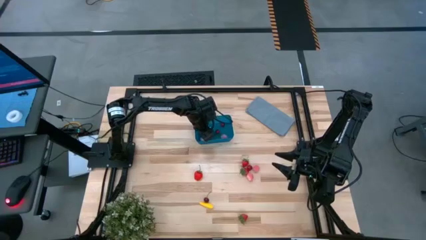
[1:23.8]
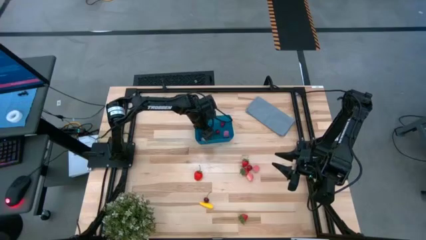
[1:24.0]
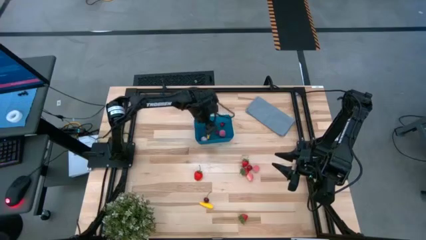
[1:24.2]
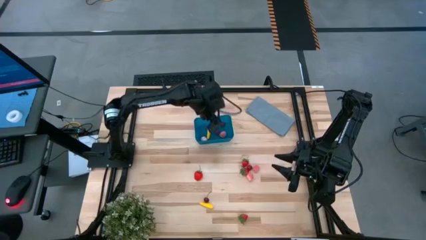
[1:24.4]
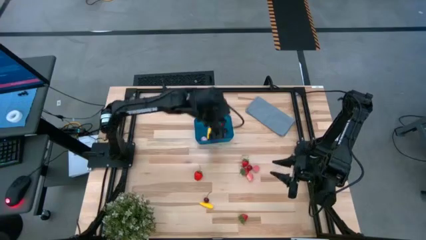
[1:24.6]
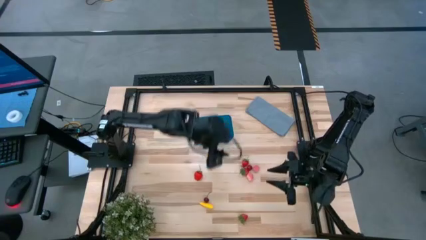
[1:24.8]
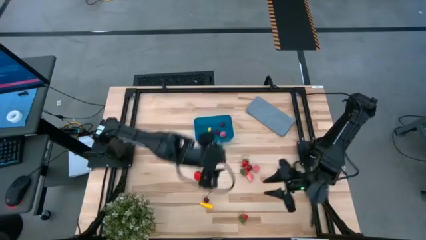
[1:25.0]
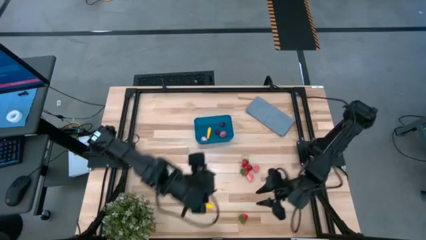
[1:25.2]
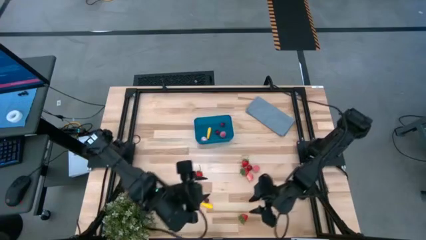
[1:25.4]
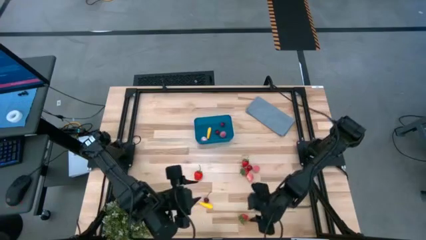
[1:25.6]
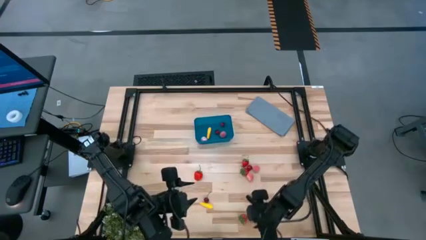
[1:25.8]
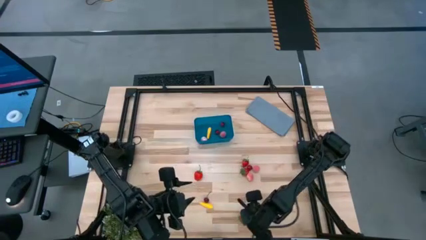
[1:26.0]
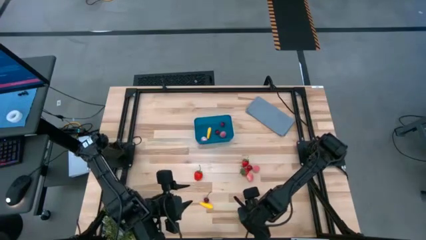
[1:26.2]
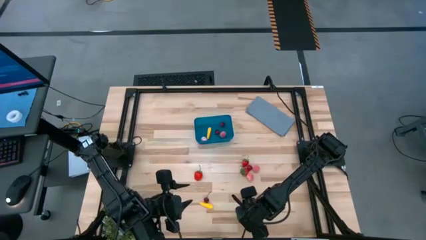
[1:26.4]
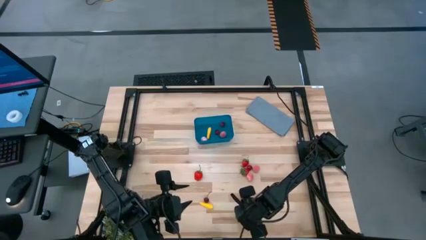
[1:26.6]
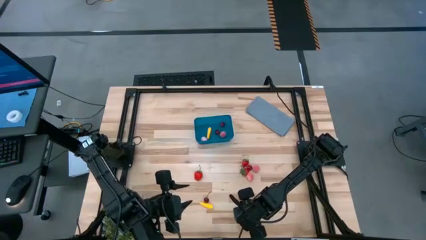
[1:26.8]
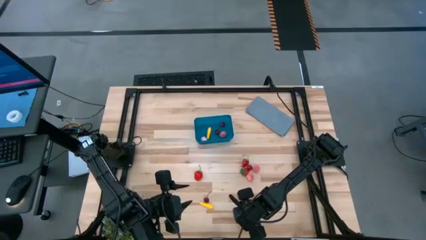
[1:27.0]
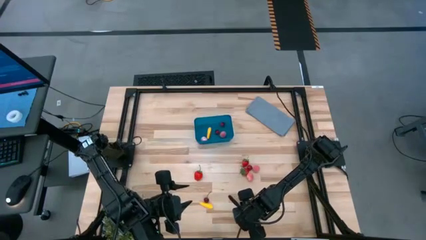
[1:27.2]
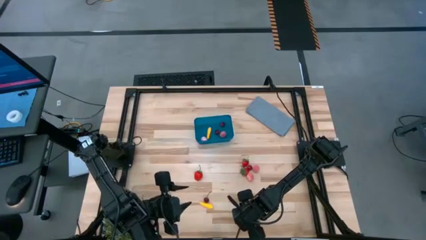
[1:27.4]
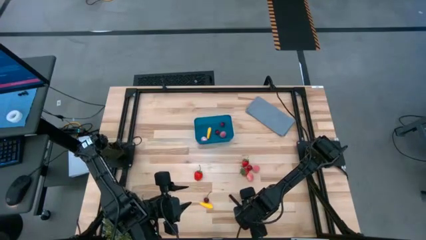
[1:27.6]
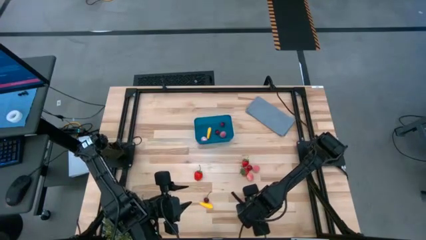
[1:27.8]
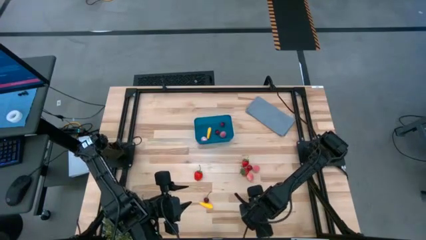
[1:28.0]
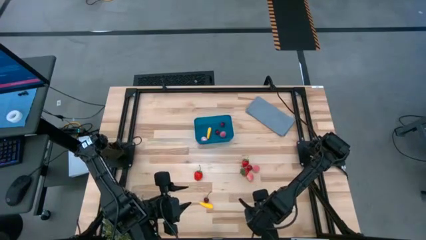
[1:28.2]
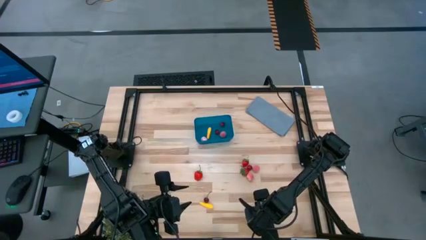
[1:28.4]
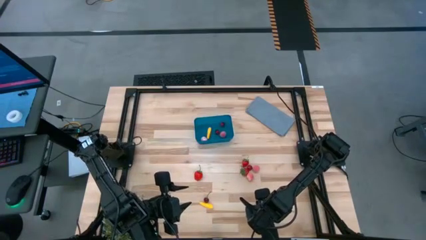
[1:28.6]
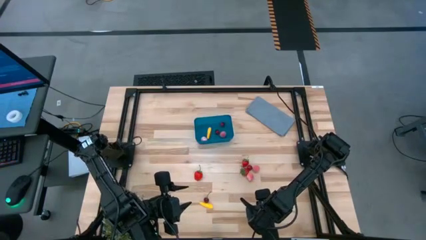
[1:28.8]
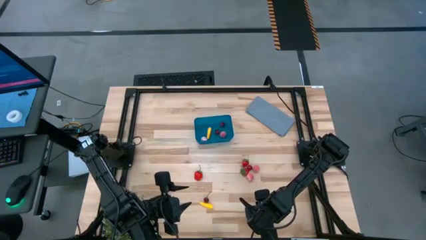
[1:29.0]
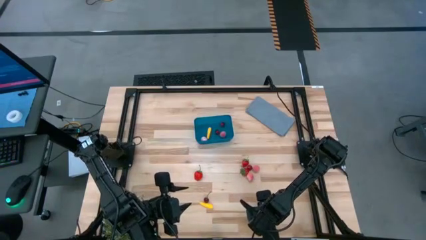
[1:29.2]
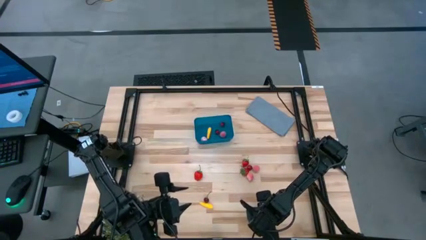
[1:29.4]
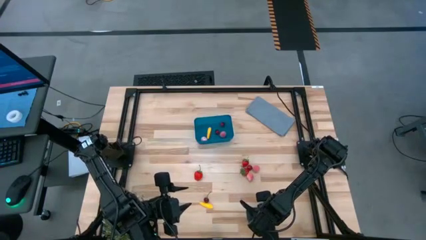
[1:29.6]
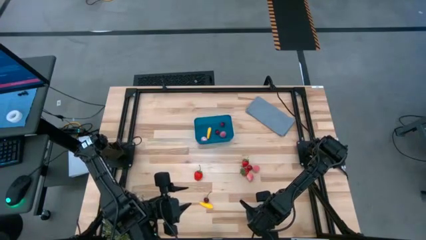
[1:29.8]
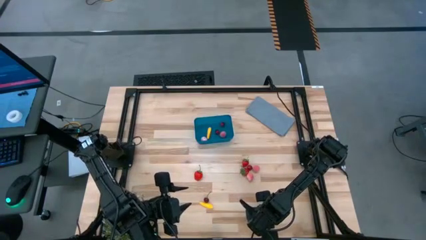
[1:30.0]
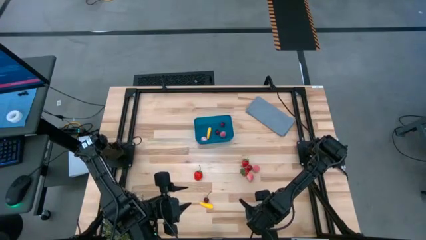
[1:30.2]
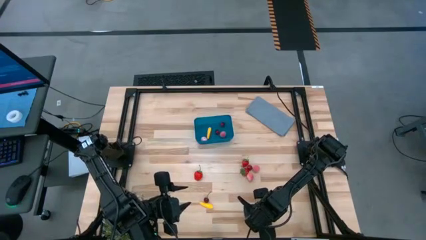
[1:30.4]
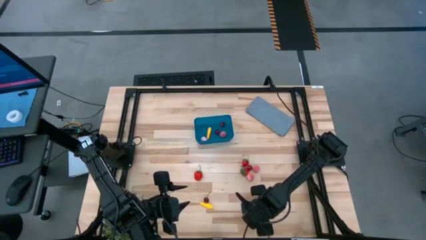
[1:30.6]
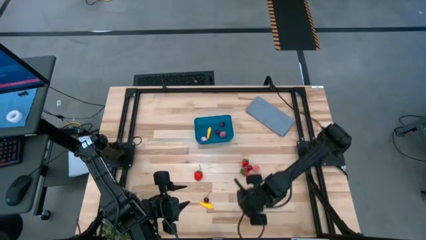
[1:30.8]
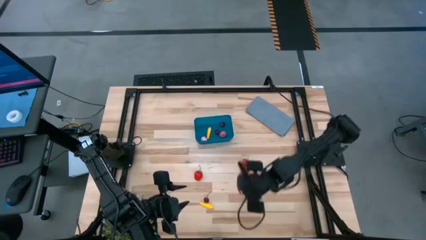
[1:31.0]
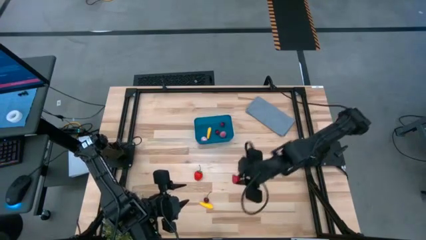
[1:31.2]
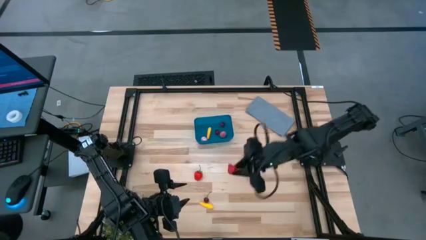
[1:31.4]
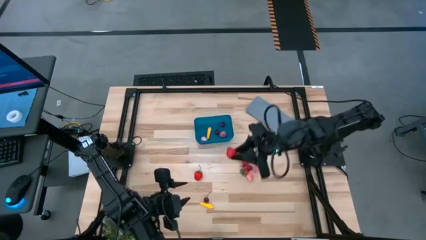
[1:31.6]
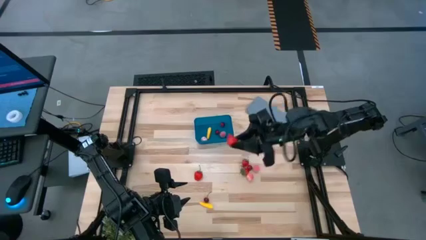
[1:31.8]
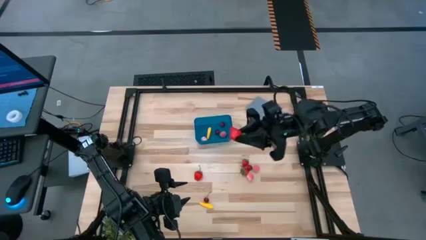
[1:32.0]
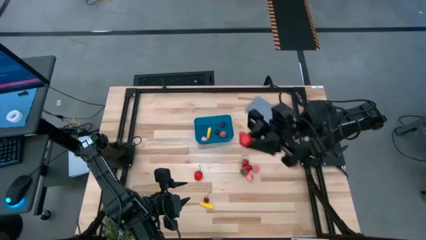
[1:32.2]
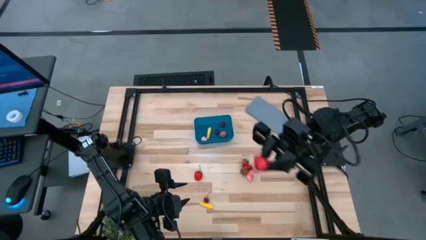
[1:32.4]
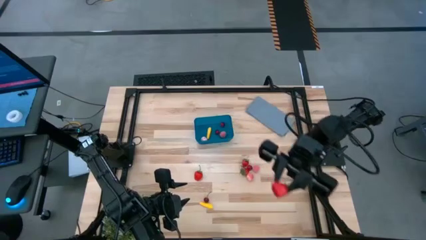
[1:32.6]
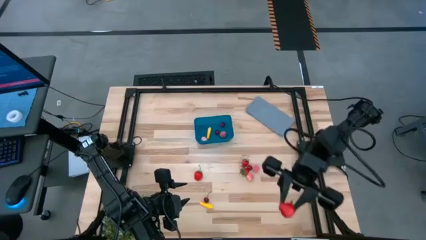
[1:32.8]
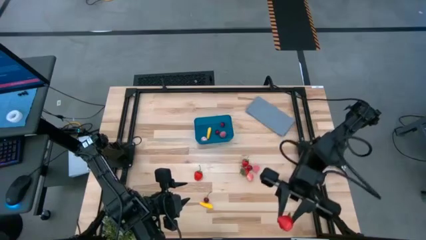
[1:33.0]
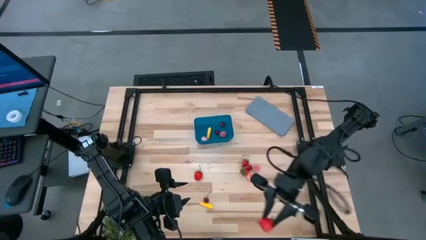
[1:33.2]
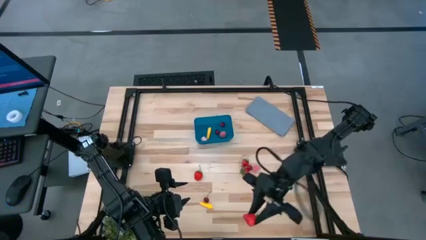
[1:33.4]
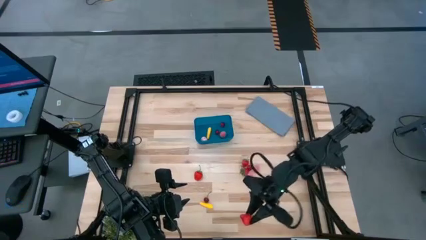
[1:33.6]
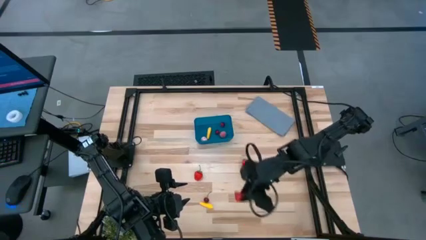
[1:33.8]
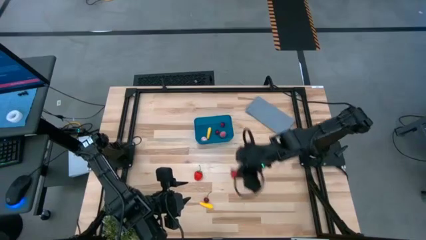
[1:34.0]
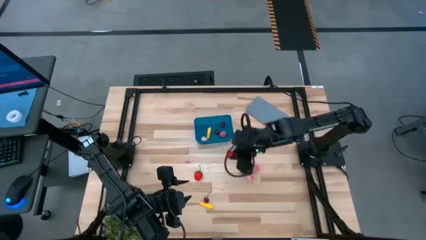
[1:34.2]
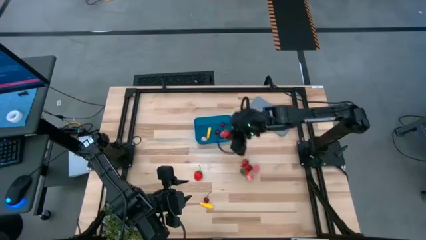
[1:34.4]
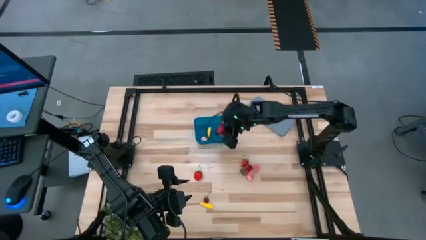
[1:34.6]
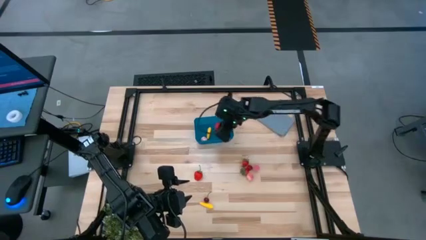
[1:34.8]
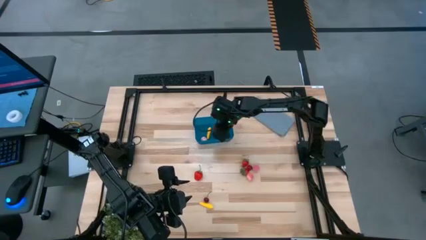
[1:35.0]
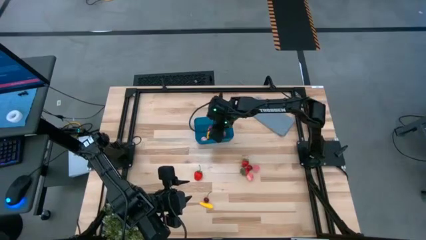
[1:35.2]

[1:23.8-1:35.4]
Task: Pick and placing Produce into tupperware
Put the red strawberry into the blue bin
